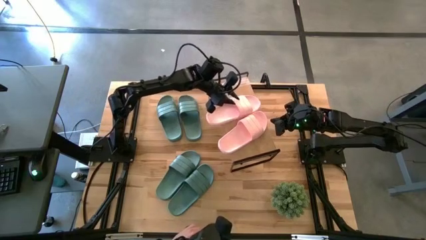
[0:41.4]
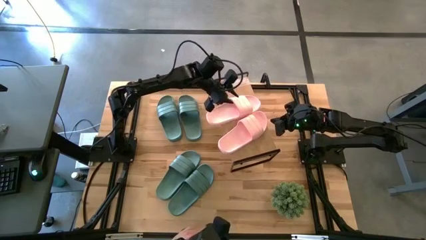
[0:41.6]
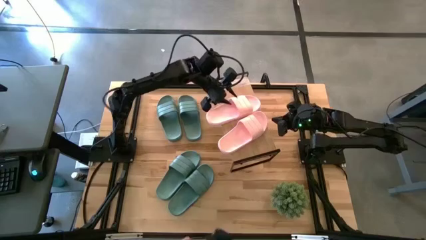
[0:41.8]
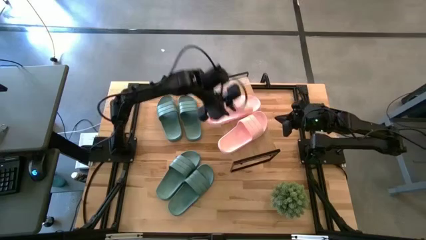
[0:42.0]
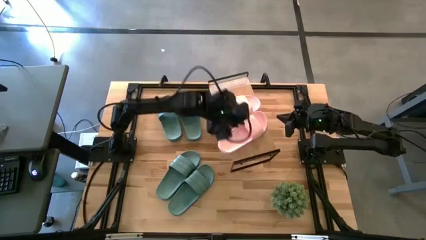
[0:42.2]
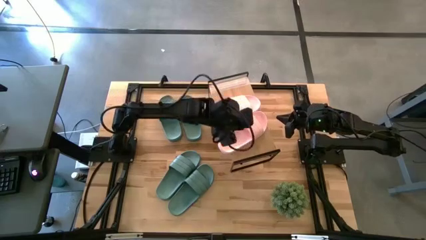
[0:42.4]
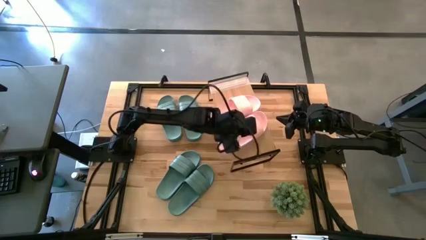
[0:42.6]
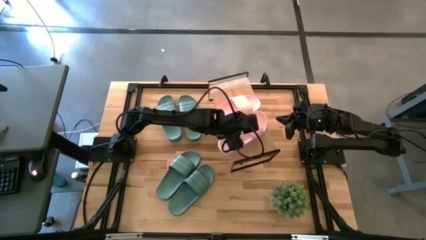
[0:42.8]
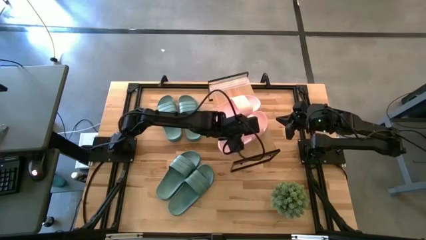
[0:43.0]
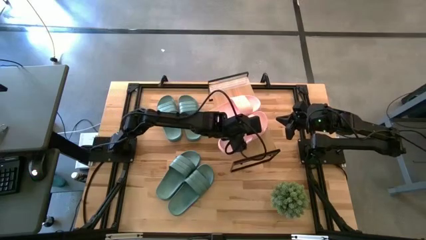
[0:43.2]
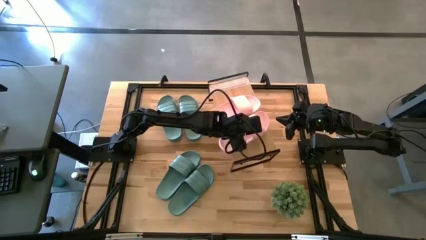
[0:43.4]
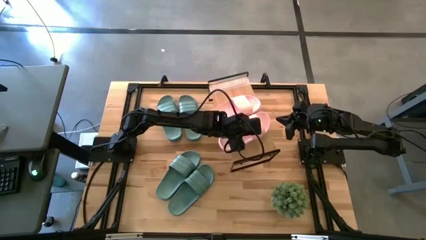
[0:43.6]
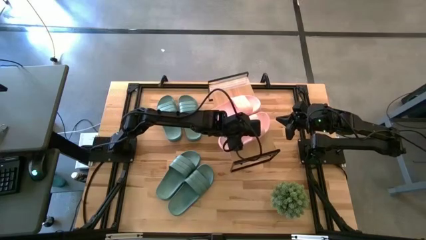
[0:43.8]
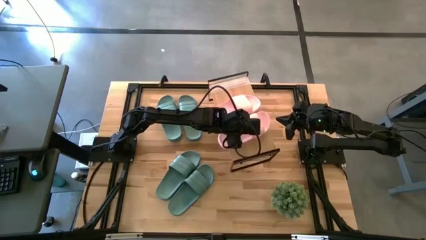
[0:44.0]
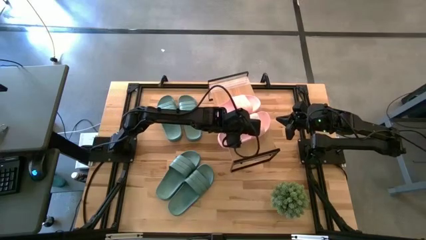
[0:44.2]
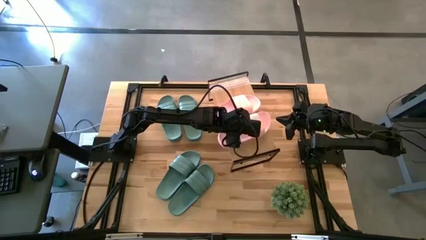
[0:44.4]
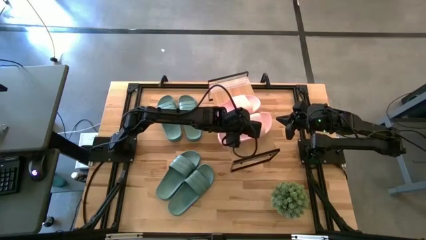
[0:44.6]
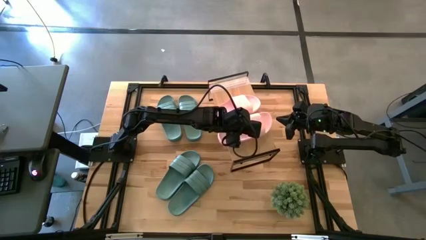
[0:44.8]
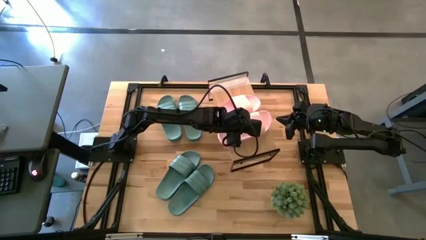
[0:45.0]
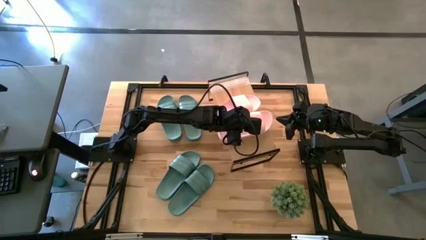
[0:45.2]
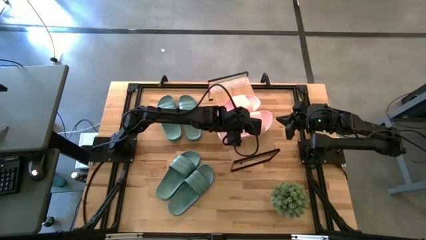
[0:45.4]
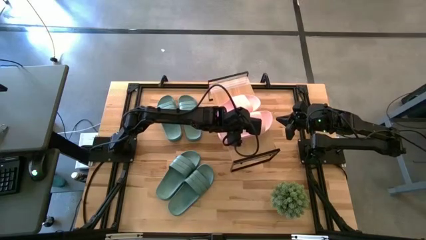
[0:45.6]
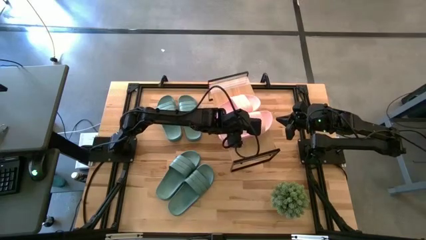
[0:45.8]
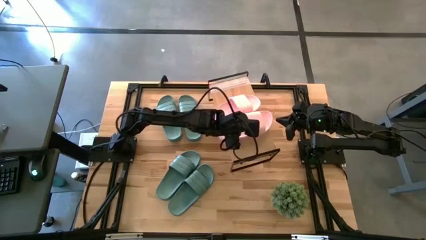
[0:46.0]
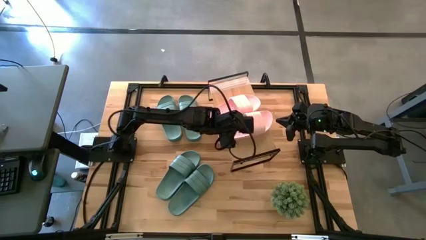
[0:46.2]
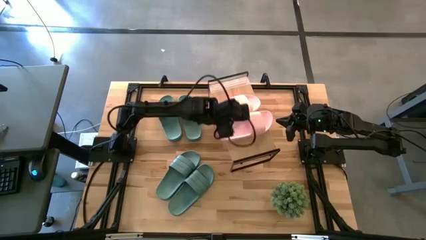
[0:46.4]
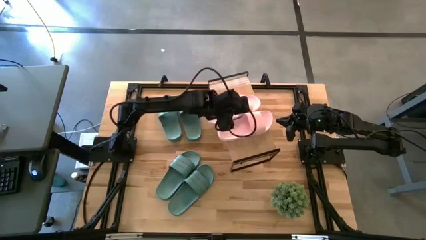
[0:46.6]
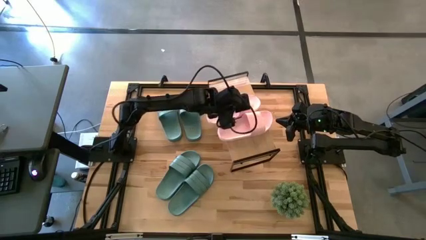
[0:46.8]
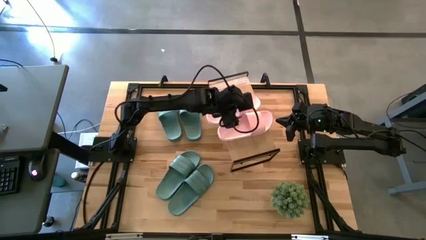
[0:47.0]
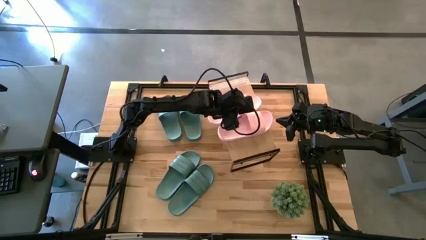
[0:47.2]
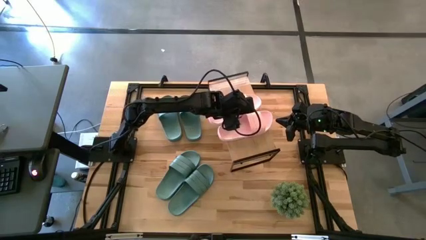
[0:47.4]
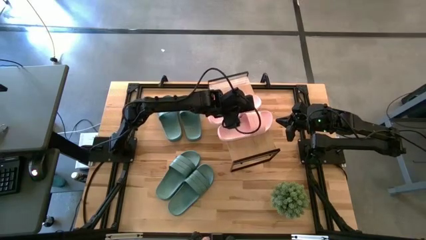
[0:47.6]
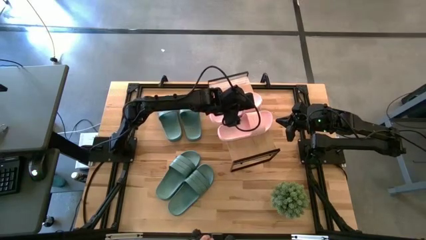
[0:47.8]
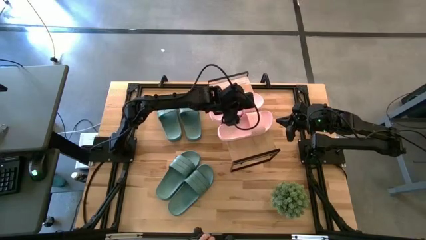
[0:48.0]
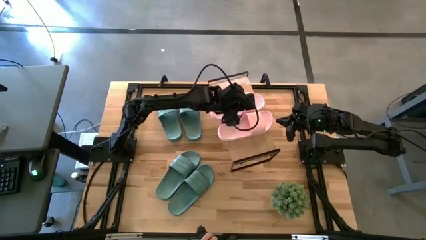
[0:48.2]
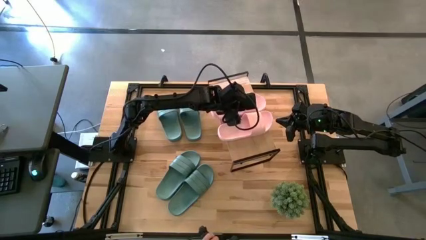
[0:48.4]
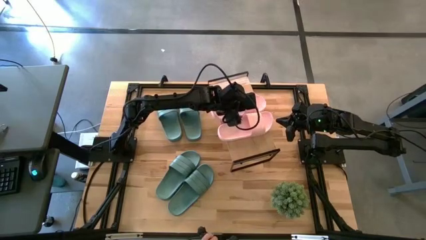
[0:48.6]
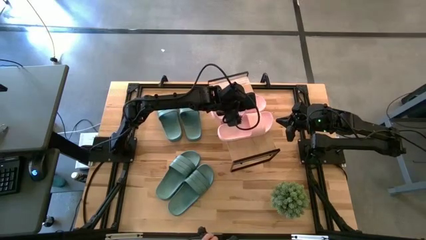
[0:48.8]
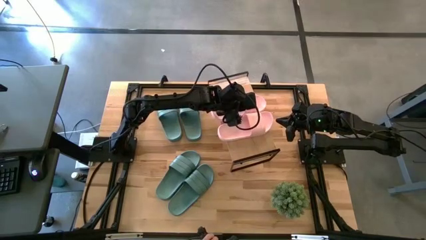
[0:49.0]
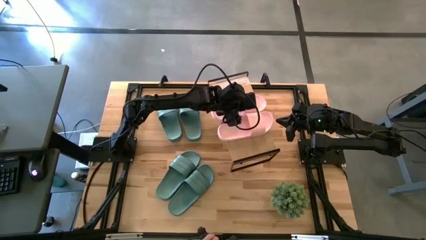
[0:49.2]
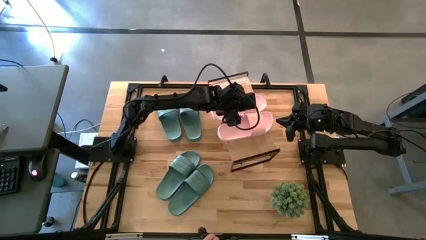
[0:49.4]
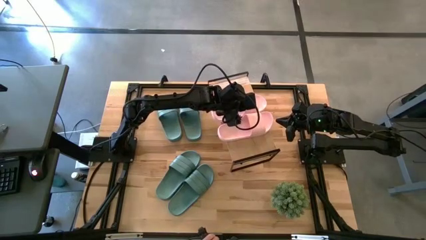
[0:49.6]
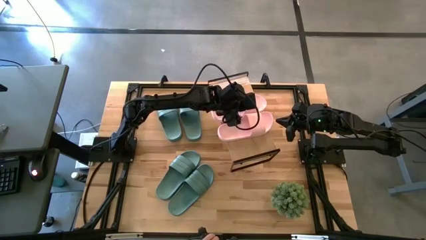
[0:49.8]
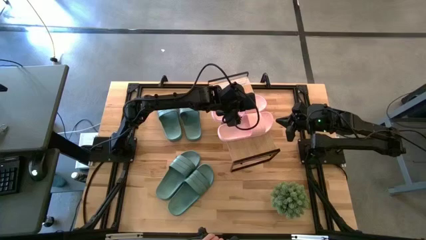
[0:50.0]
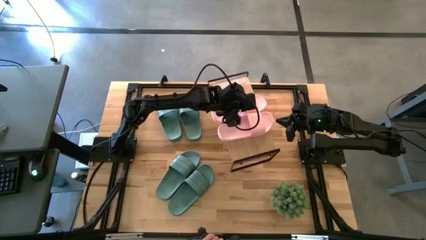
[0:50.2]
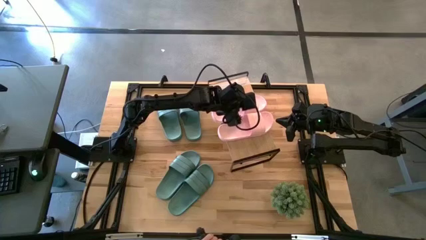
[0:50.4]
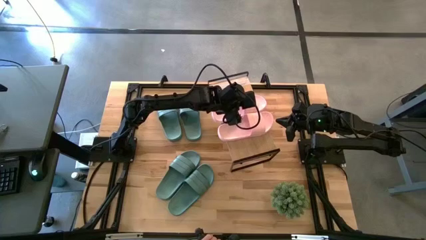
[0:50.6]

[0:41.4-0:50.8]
Task: Pick and place slides into the shelf
Adjust the pink slides

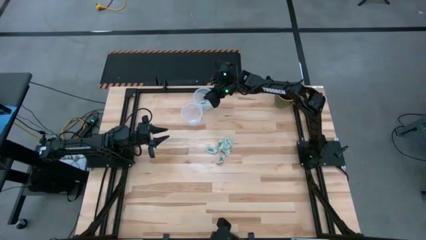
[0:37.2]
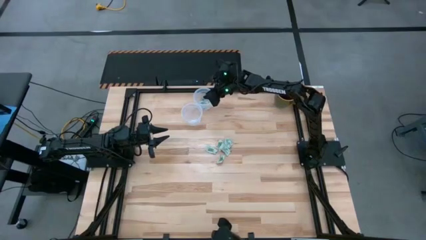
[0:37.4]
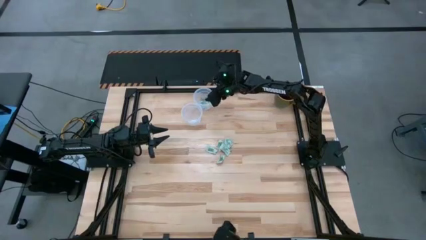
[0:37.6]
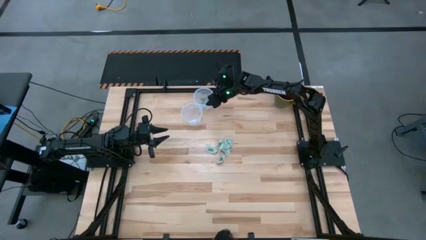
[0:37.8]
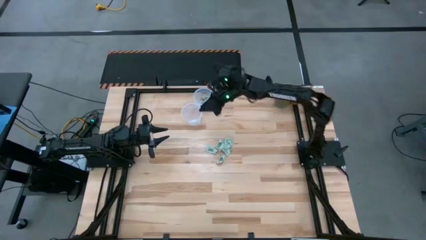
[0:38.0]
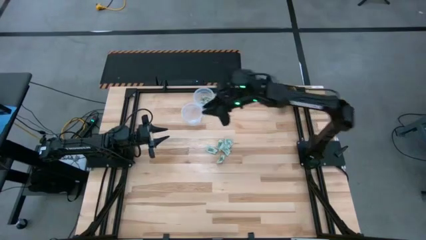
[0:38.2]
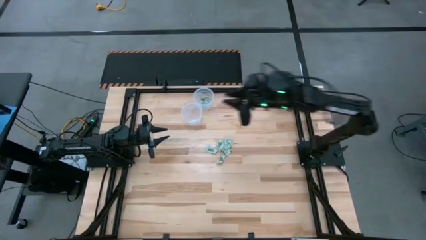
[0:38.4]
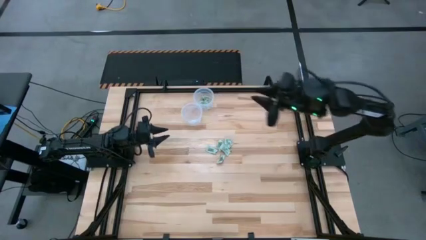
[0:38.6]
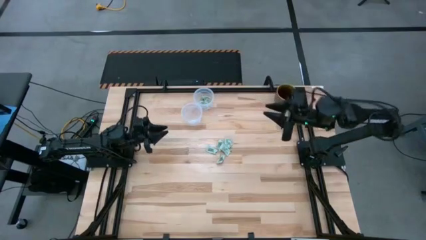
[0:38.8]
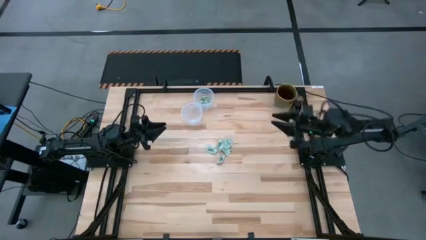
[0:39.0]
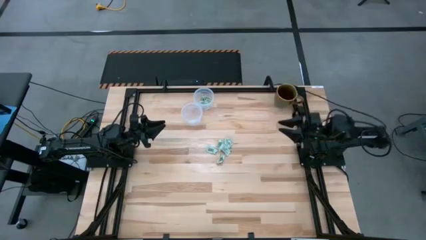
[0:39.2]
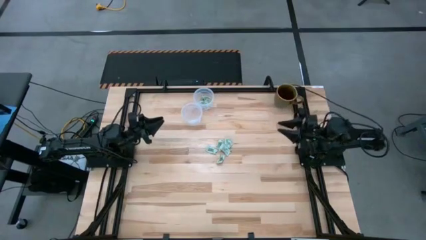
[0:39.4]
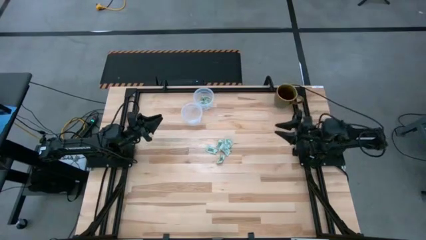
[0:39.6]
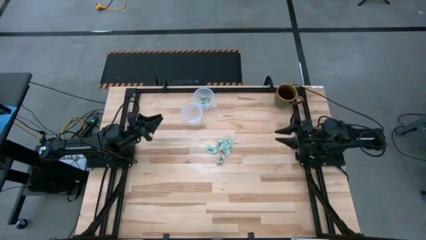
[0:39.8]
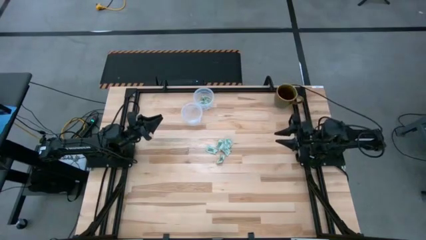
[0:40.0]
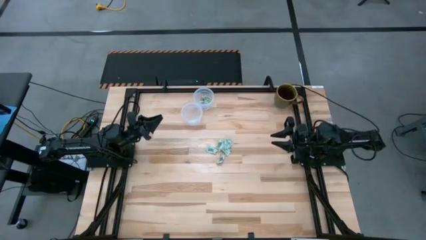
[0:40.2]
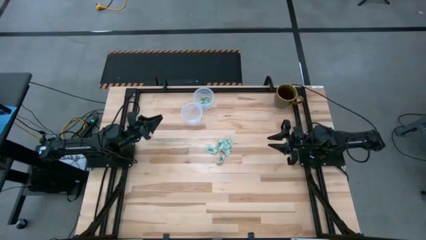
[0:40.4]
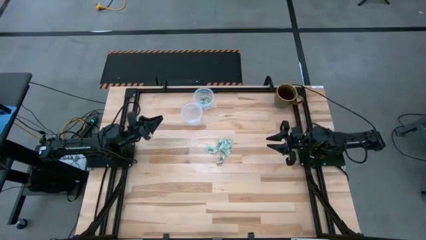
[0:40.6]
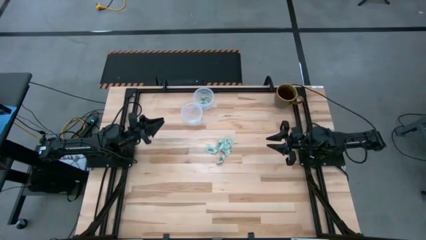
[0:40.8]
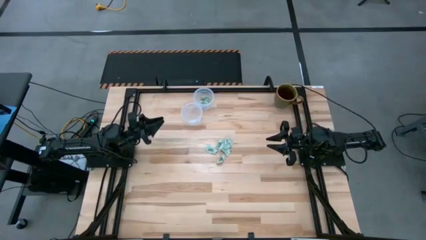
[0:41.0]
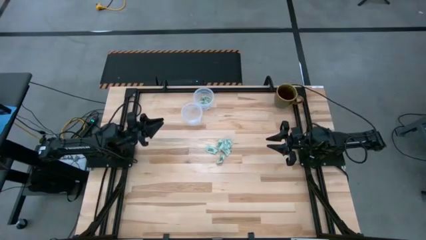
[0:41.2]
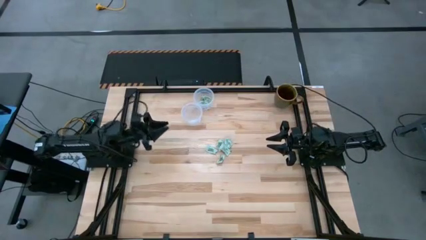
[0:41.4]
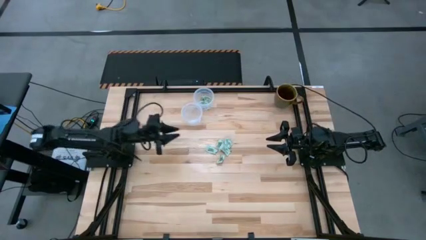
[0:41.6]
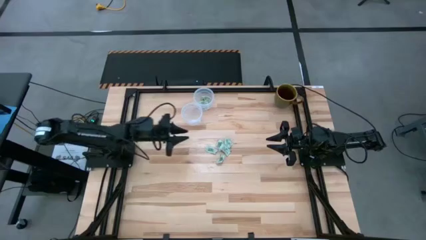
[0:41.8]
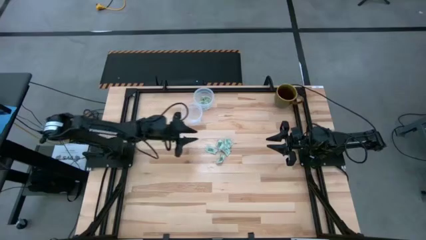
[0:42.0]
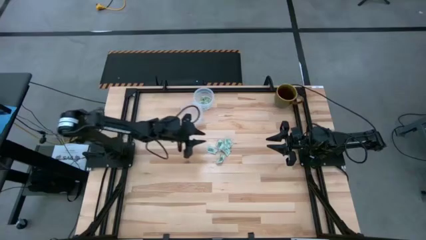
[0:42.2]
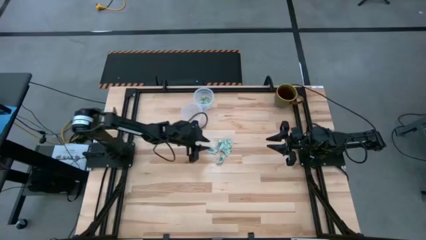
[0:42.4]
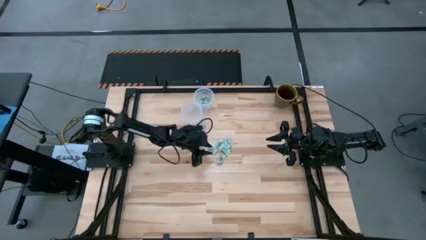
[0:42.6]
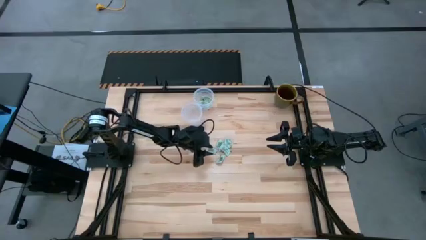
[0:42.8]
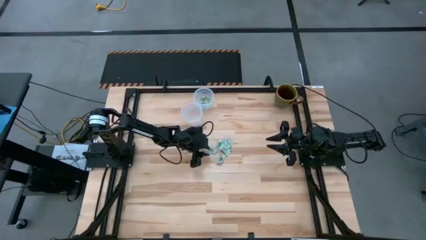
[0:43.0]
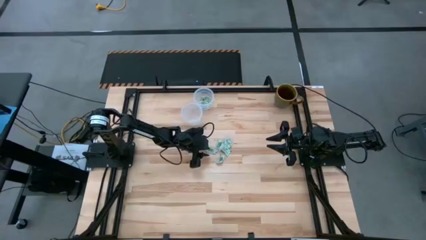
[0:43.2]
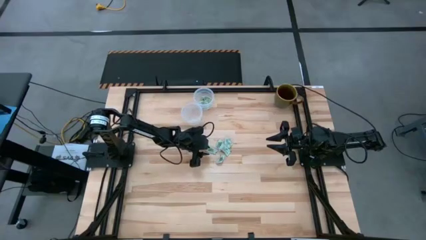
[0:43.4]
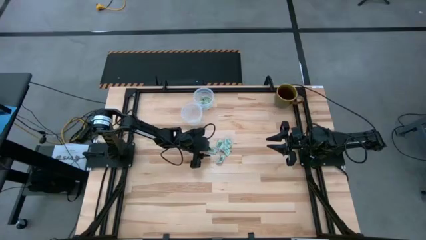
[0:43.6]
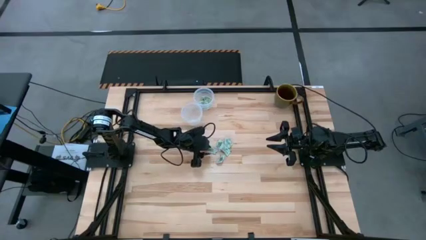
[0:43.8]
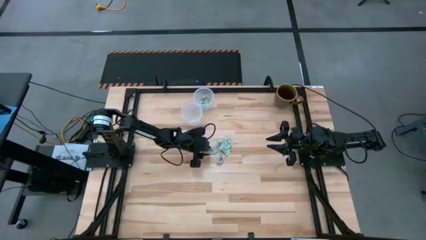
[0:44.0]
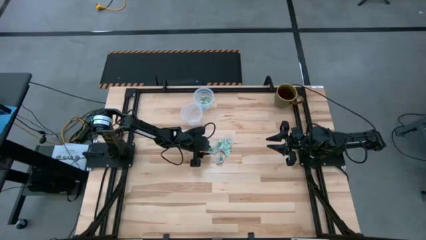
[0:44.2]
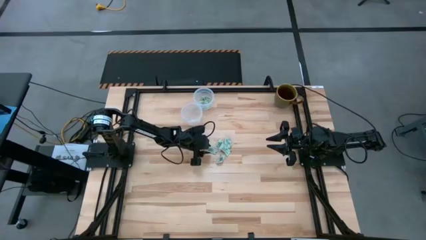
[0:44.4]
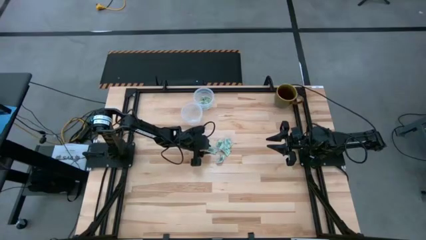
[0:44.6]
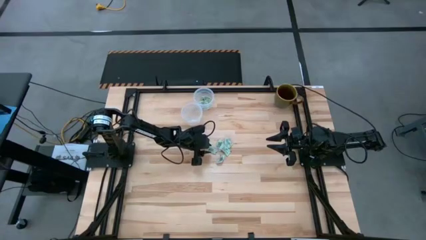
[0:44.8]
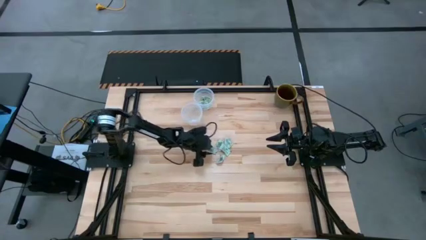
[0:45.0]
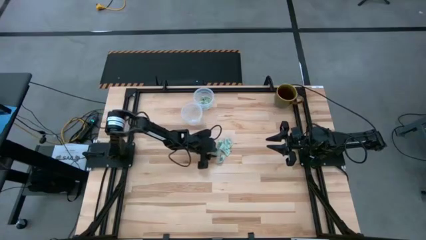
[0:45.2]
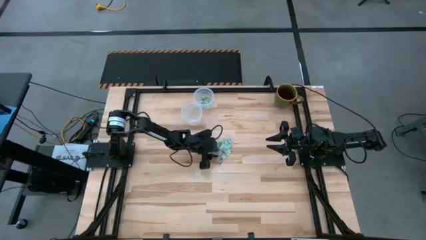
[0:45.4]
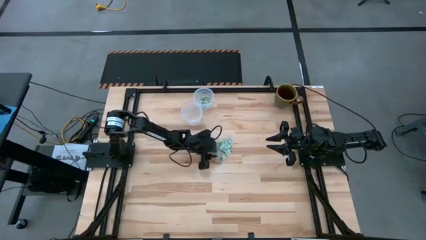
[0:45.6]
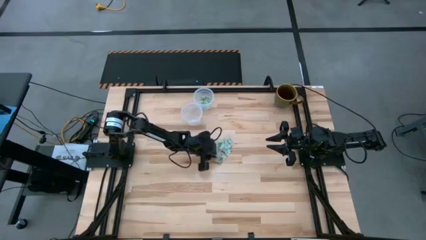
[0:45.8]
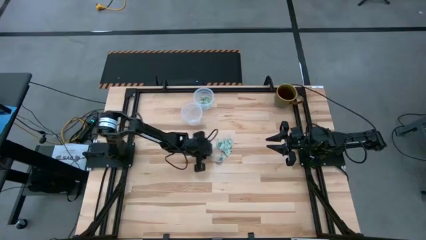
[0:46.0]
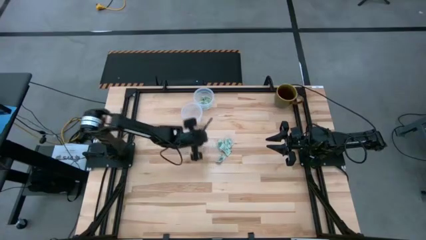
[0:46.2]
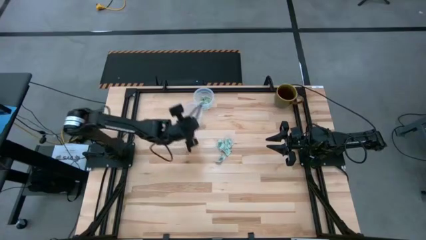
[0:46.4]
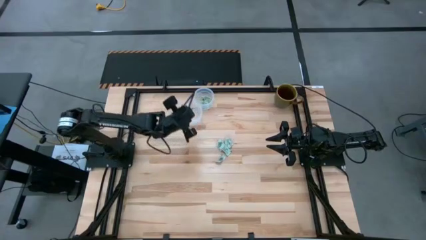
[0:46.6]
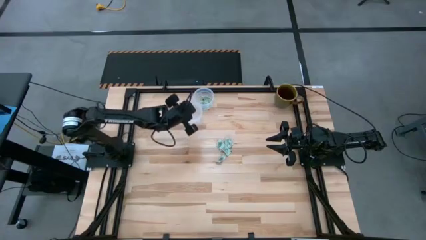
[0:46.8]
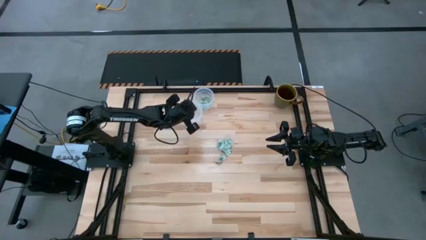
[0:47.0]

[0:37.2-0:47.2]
Task: Pick and place items into bin
Put the stevia packet into the bottom bin
